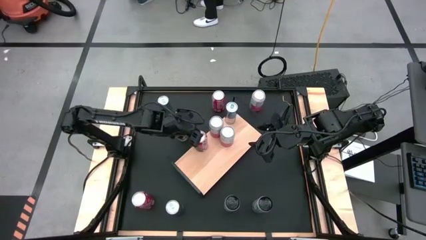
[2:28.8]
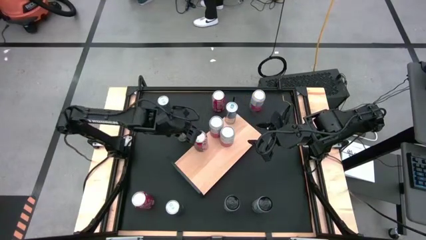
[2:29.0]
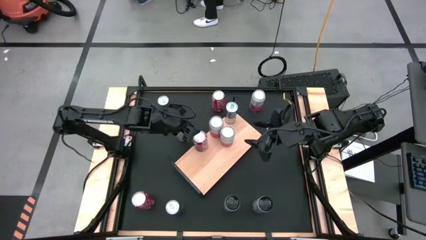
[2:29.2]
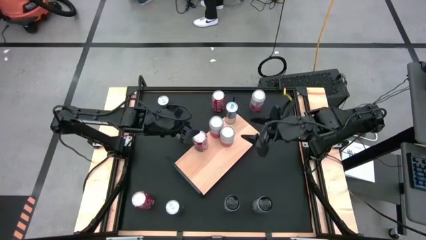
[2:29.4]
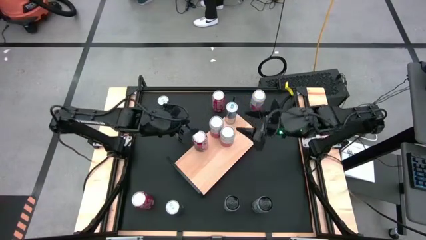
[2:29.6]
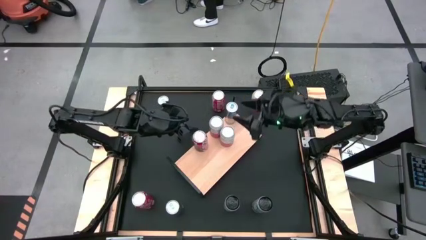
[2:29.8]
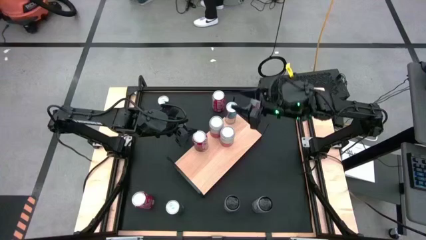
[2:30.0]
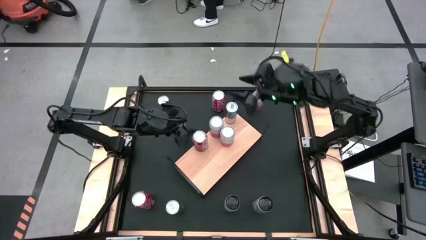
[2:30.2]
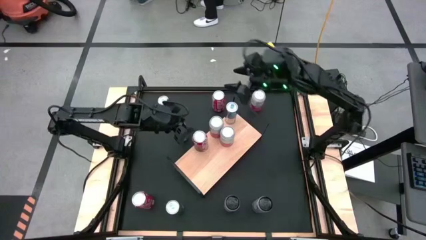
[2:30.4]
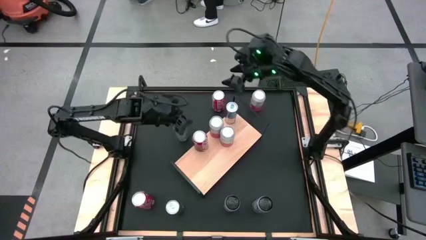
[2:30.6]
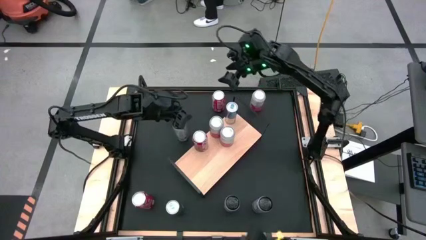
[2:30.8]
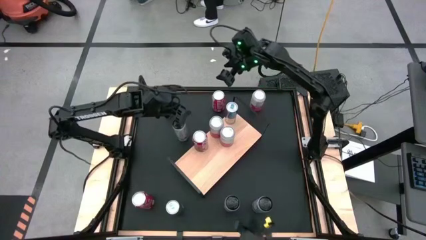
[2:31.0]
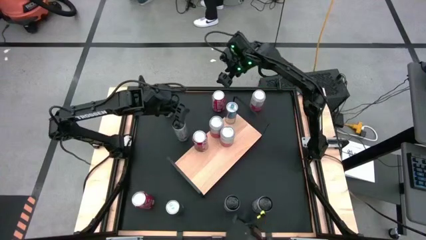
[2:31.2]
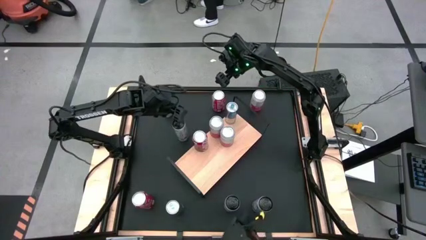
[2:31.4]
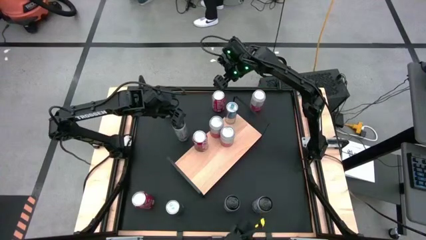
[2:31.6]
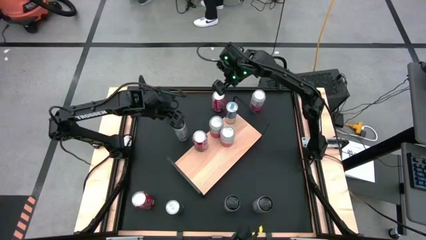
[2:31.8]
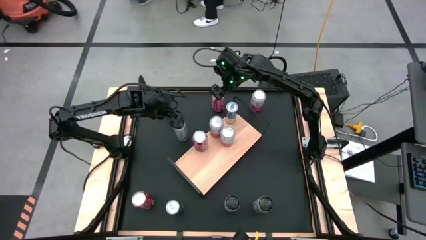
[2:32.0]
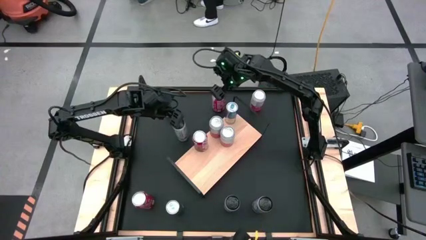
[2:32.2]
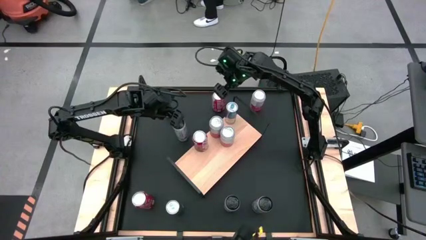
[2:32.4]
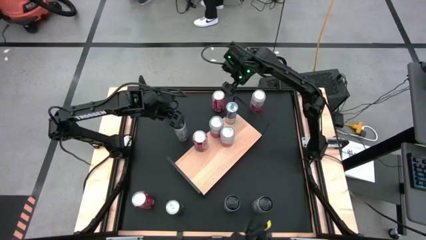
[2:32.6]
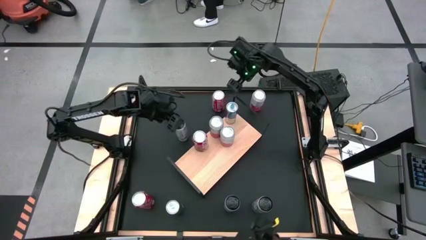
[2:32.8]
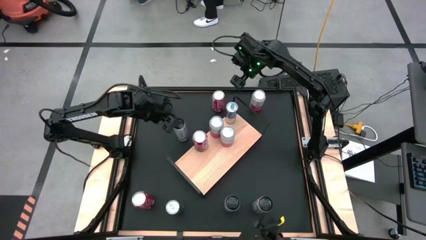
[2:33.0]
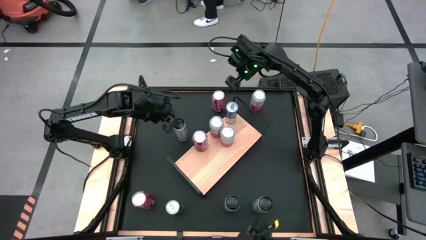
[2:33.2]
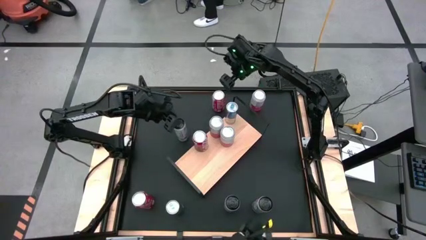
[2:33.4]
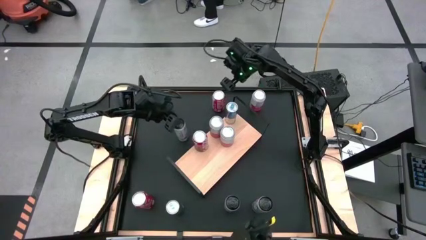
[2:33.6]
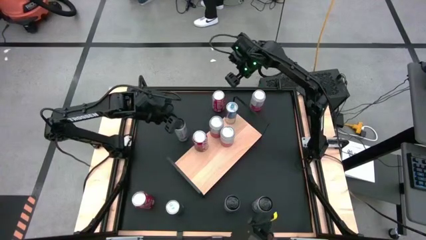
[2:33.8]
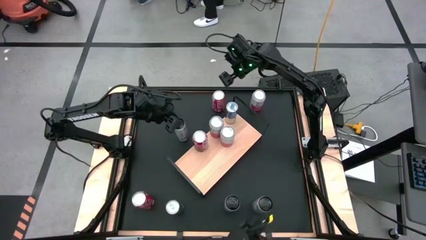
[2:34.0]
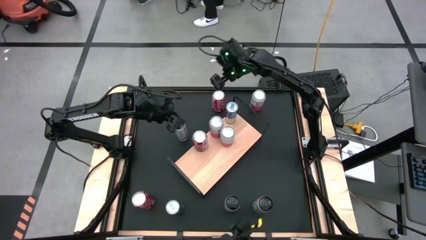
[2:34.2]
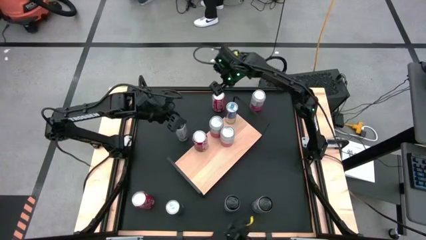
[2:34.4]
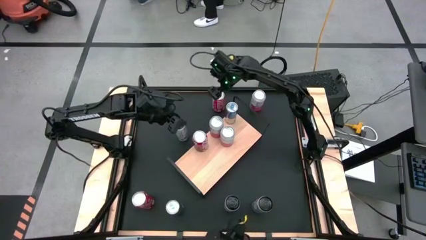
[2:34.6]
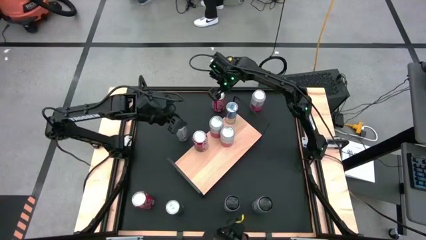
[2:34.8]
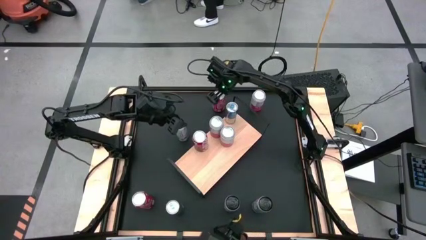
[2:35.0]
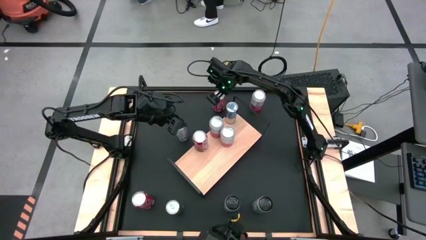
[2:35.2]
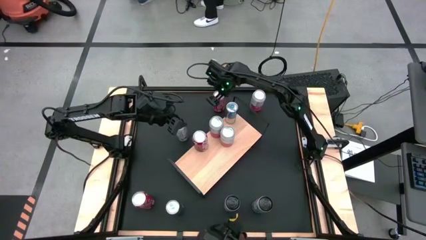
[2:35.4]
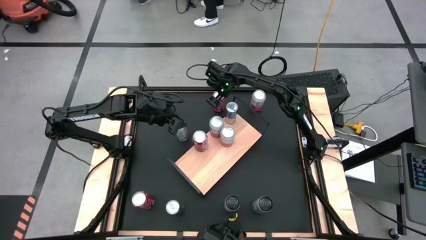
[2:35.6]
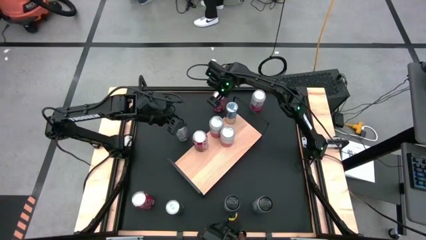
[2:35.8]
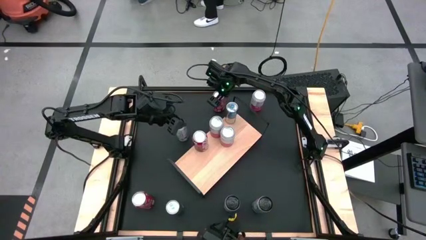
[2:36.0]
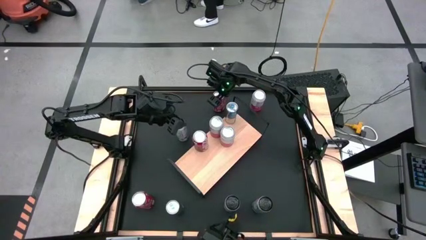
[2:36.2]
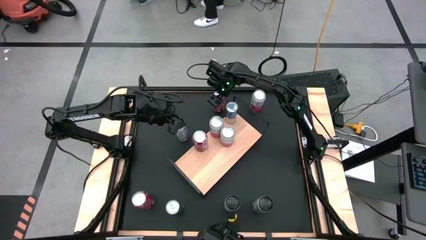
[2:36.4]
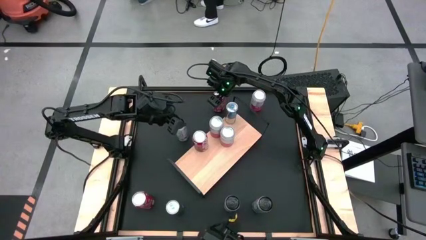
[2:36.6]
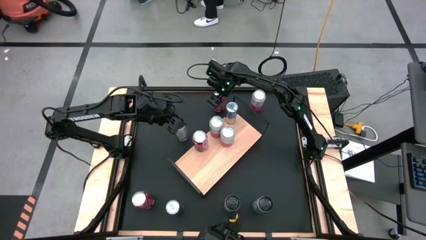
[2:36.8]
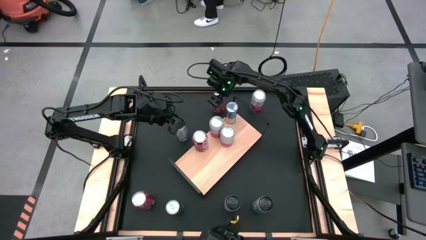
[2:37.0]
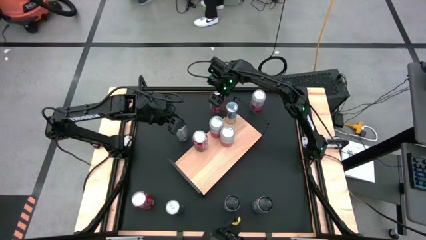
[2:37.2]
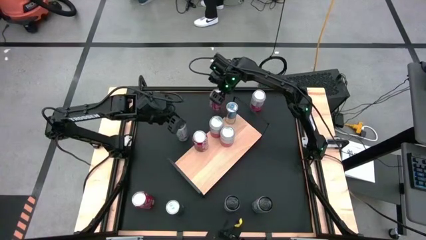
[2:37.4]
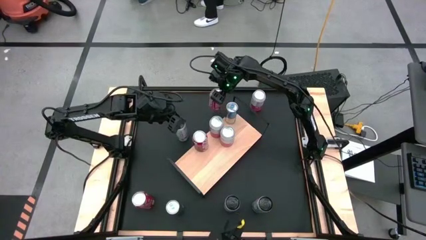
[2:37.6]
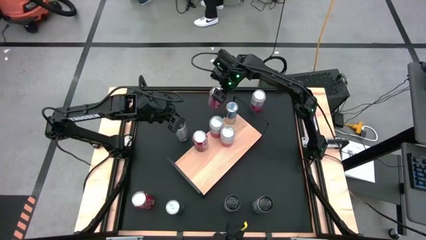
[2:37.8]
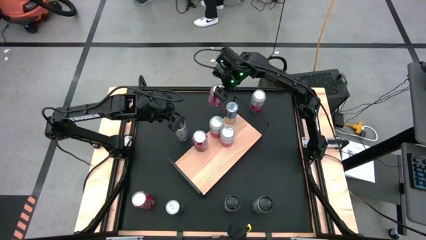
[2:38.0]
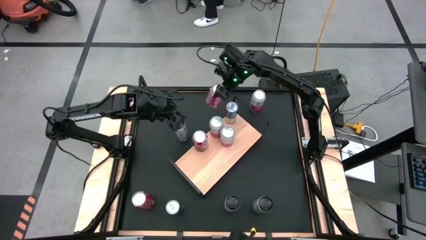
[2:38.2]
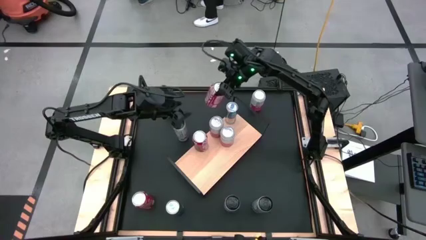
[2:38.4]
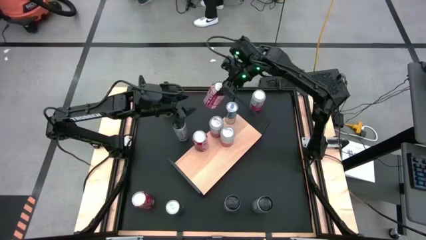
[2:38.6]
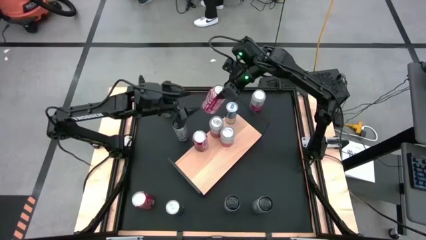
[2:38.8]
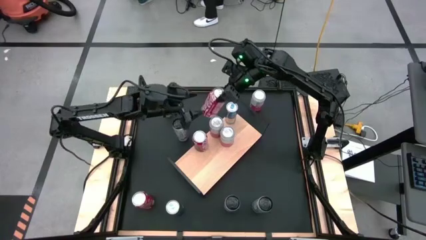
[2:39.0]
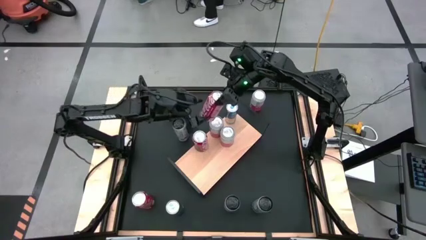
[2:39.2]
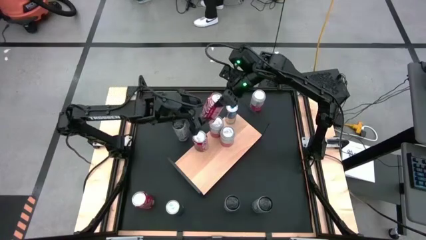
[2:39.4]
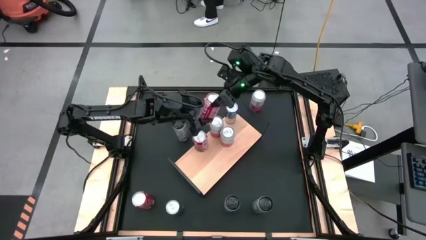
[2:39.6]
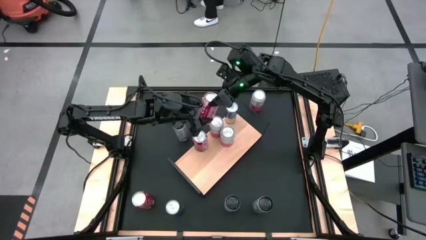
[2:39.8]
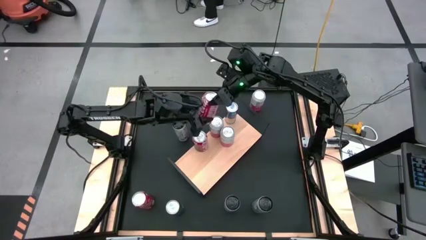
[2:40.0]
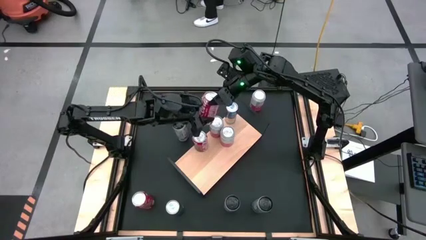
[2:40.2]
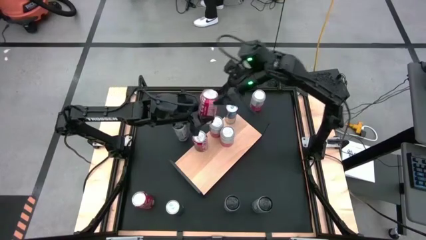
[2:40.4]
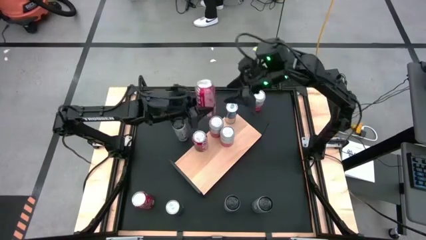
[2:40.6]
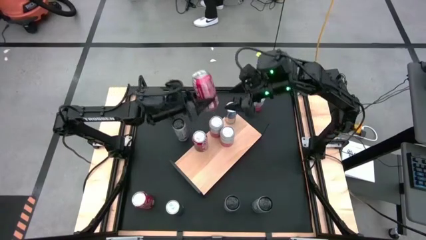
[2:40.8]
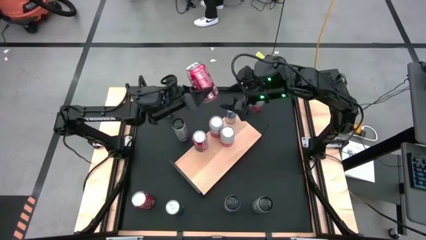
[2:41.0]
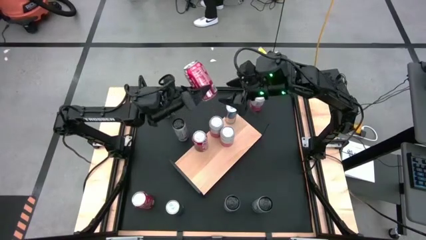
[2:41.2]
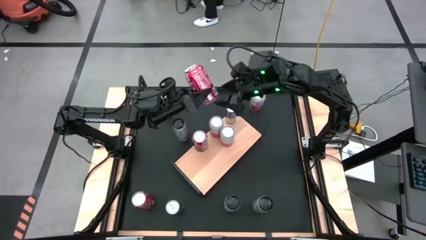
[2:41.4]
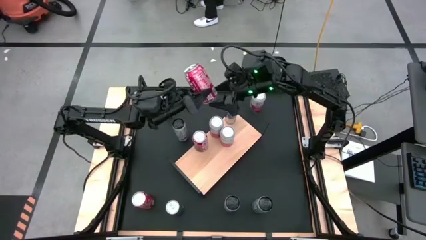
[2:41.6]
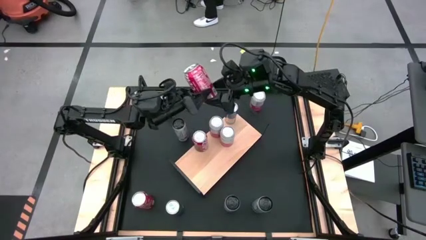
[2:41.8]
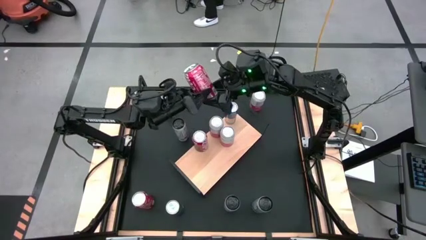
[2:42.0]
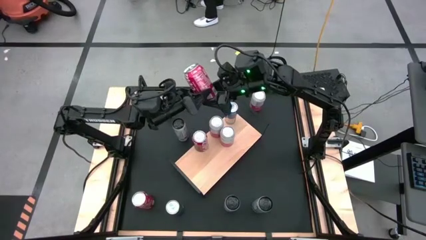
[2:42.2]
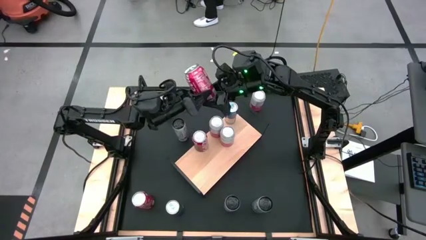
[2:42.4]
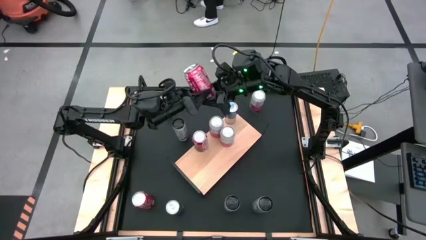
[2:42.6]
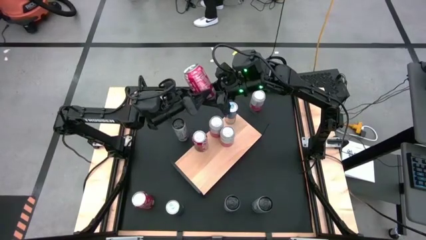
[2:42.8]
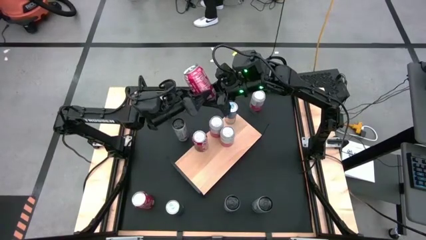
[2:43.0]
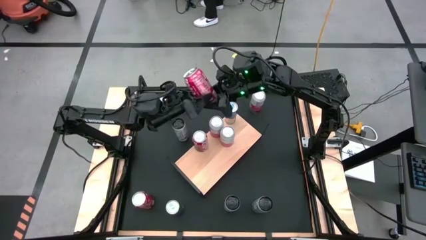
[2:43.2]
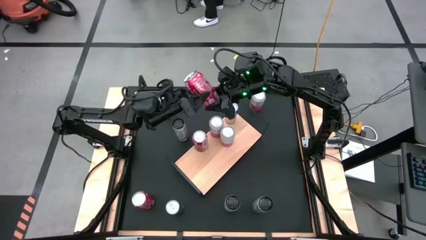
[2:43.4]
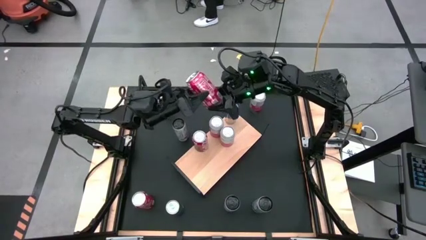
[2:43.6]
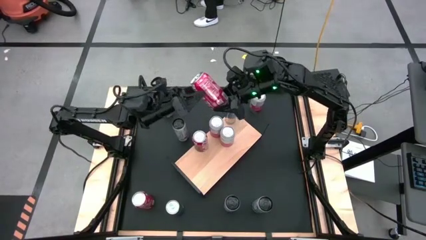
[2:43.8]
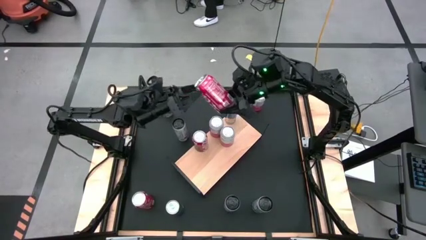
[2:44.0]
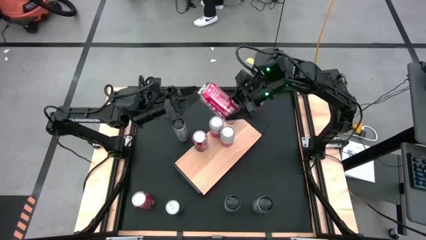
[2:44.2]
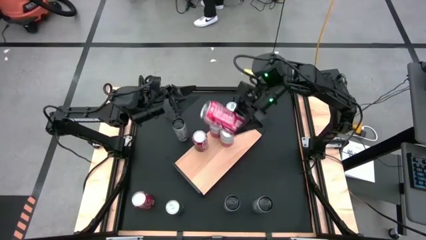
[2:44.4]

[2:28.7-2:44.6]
Task: Place canned beverage on shelf
Put the top red white soda can on the shelf aligned with the other red white soda can
